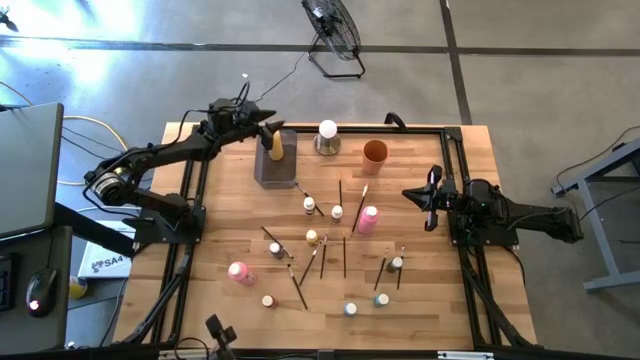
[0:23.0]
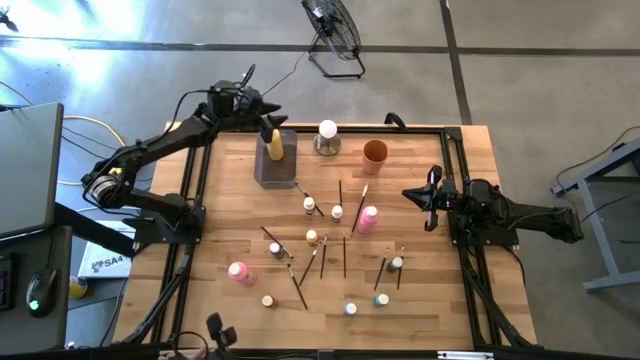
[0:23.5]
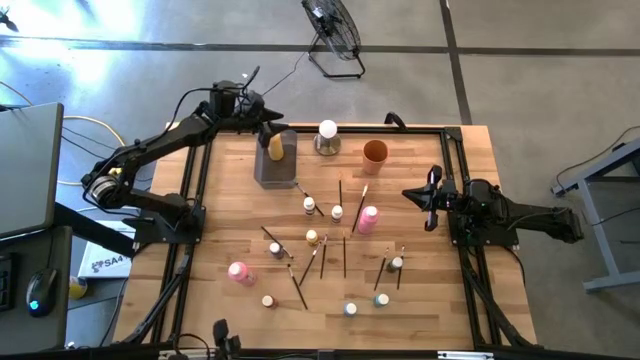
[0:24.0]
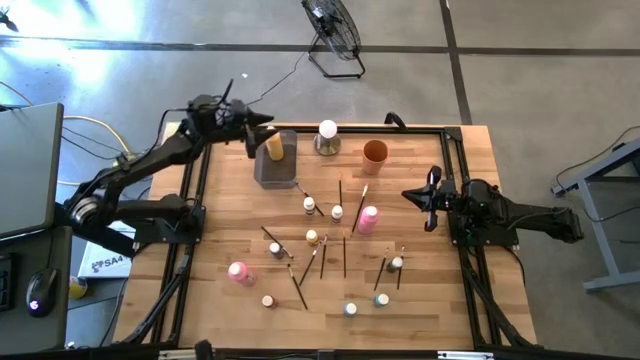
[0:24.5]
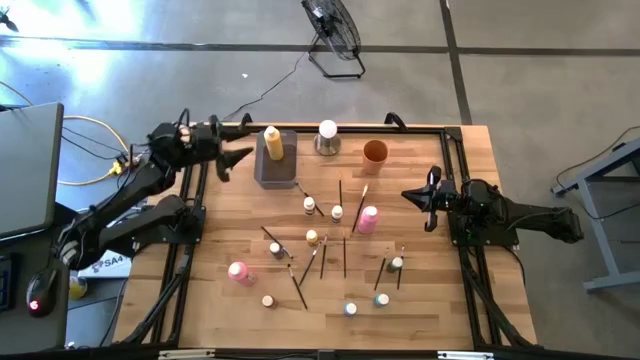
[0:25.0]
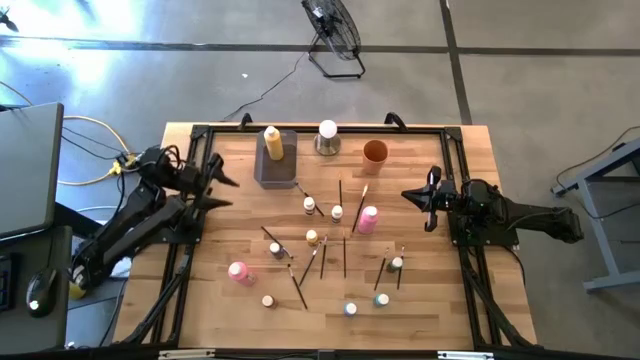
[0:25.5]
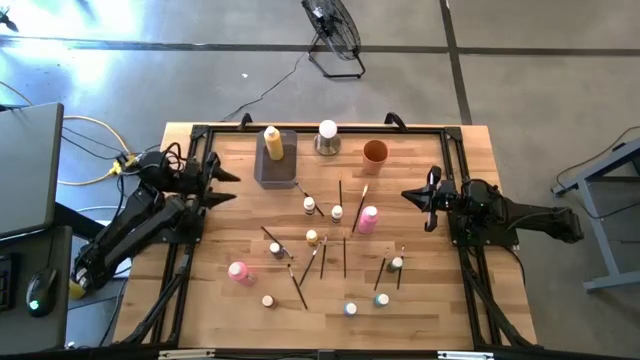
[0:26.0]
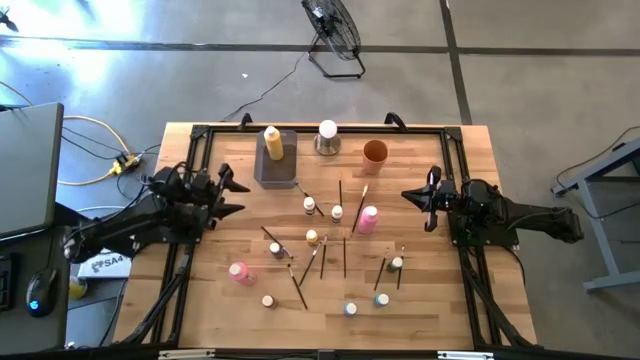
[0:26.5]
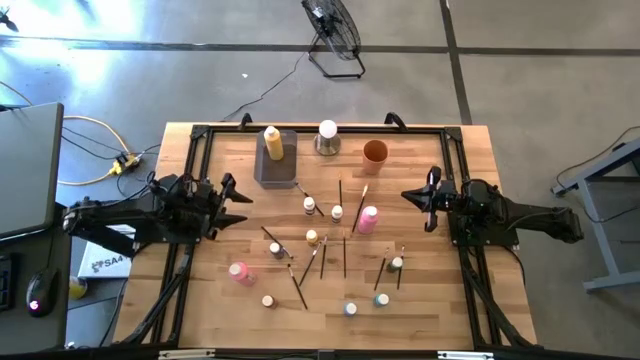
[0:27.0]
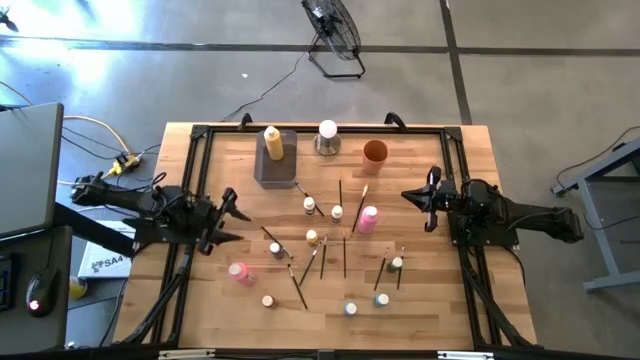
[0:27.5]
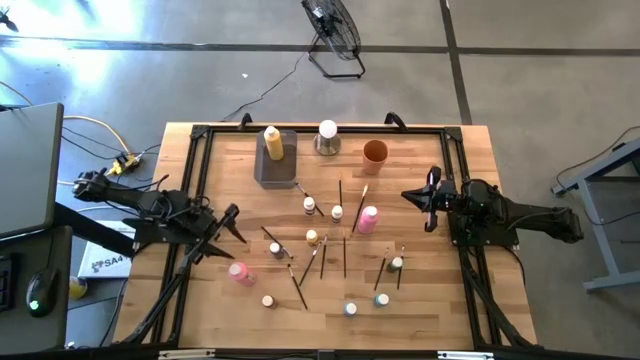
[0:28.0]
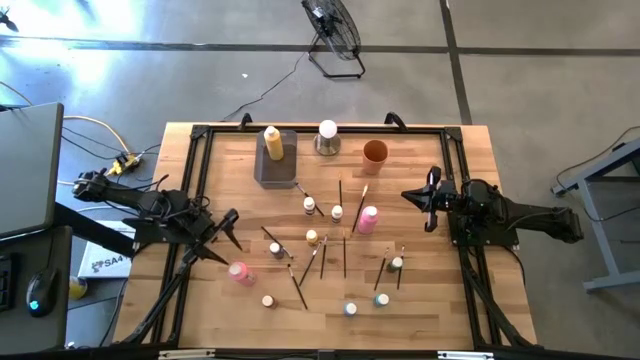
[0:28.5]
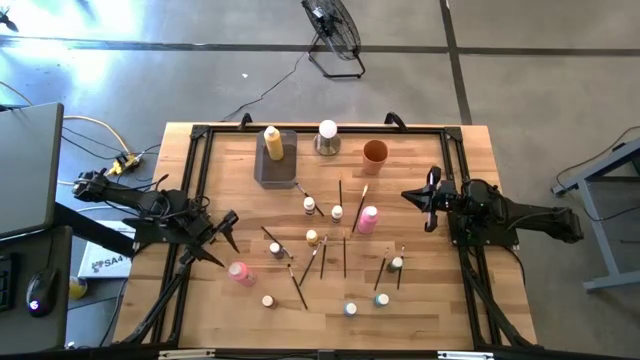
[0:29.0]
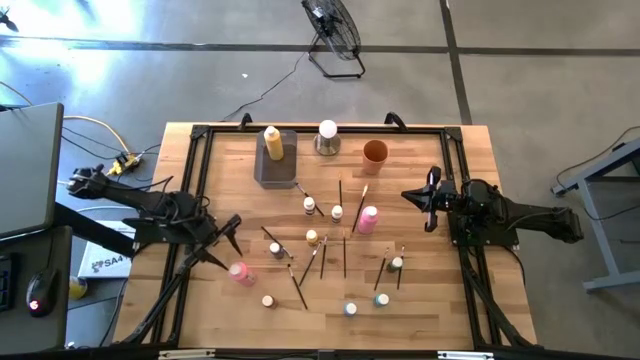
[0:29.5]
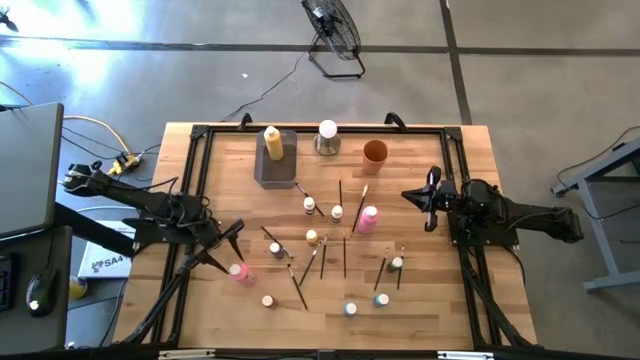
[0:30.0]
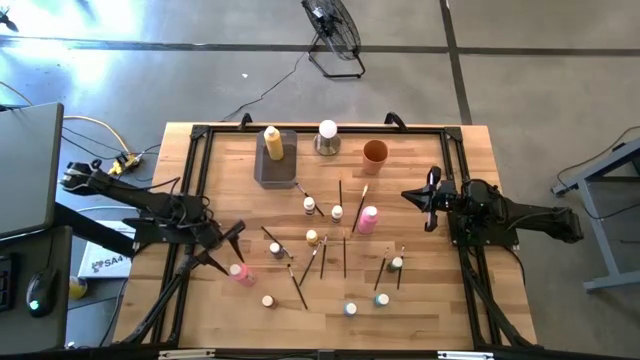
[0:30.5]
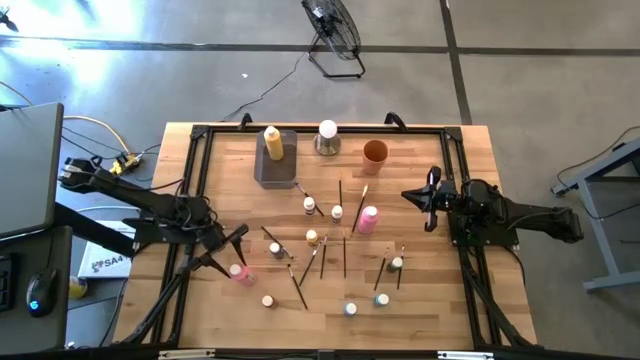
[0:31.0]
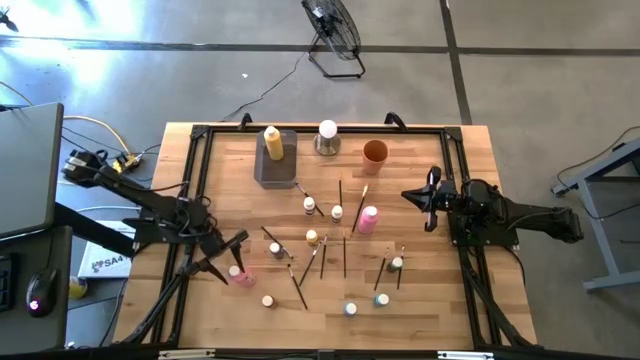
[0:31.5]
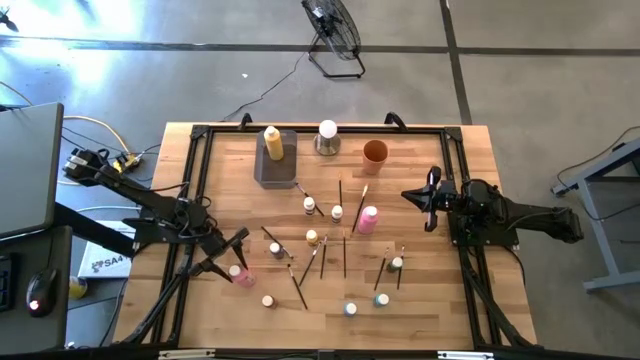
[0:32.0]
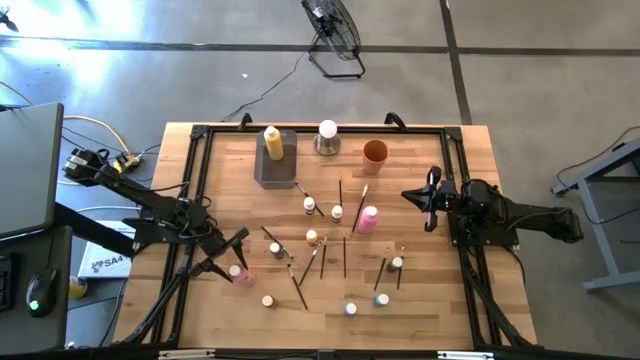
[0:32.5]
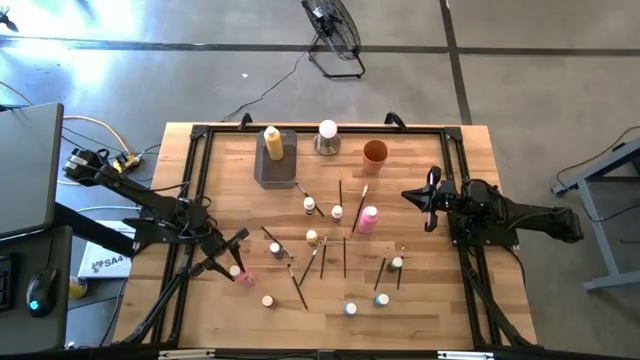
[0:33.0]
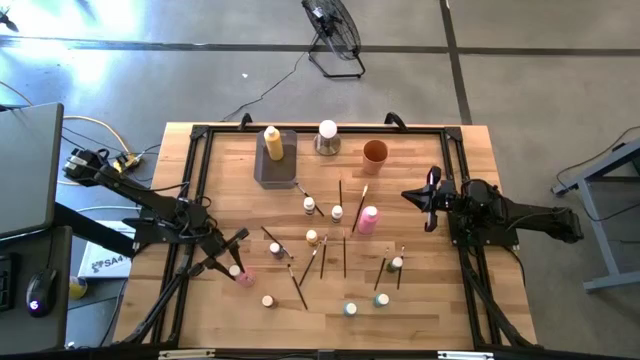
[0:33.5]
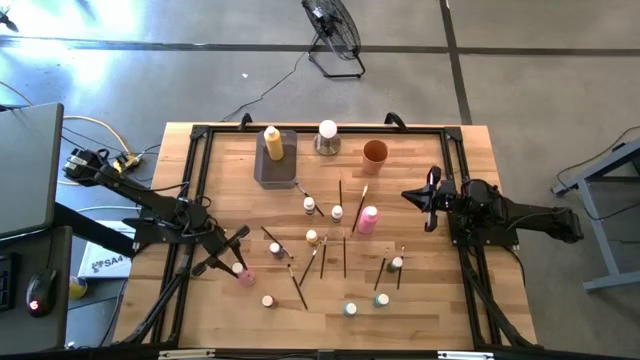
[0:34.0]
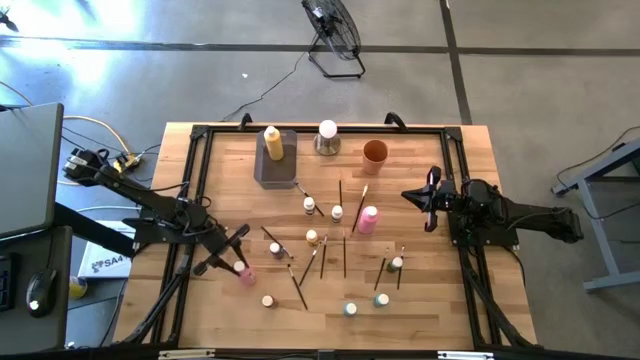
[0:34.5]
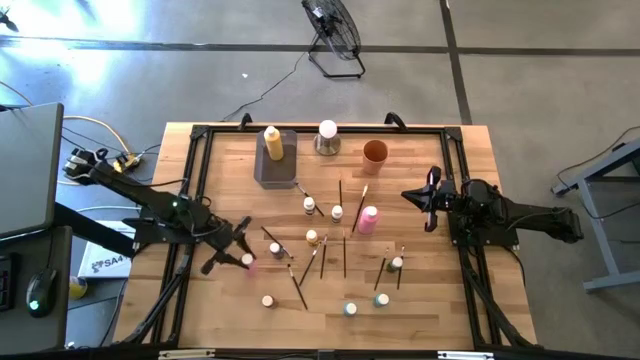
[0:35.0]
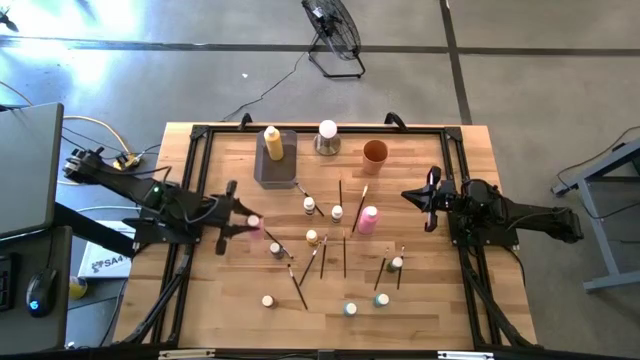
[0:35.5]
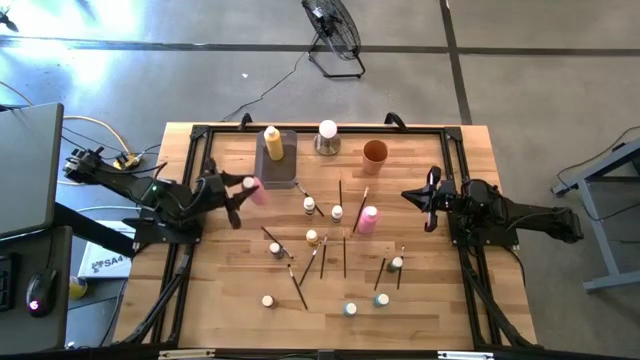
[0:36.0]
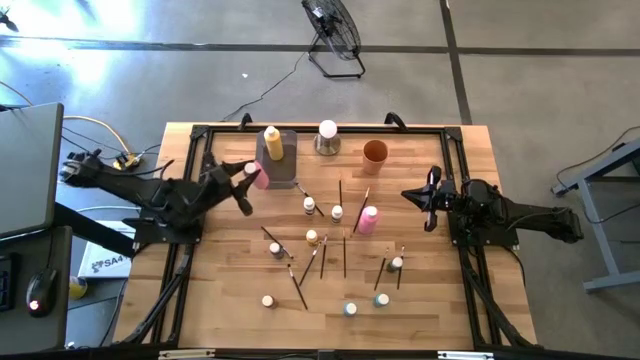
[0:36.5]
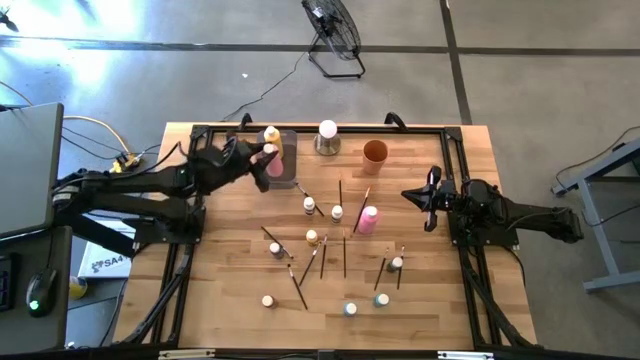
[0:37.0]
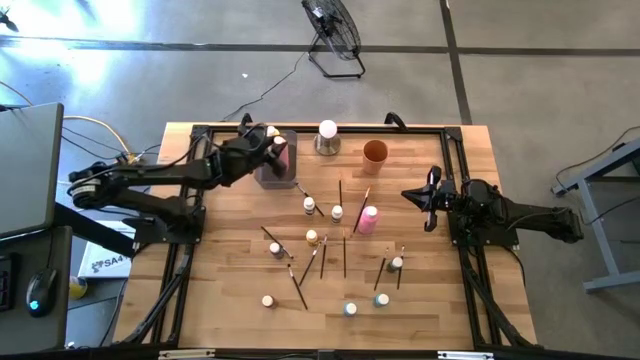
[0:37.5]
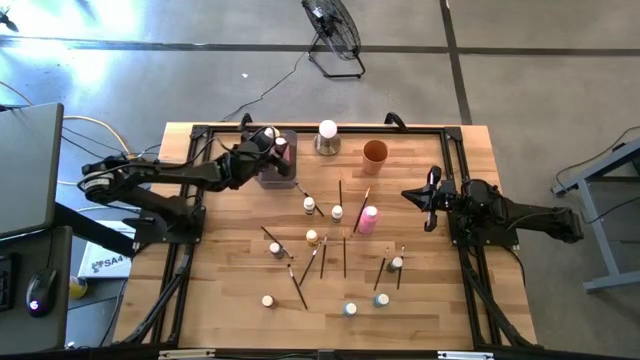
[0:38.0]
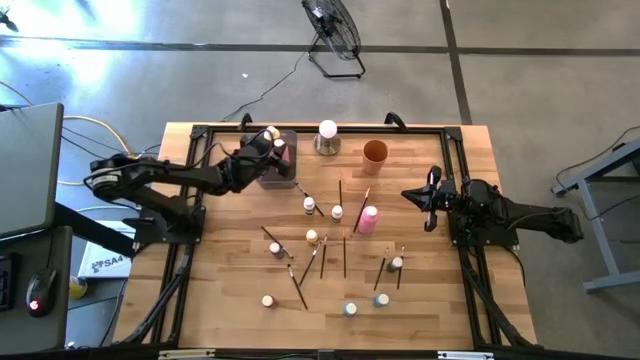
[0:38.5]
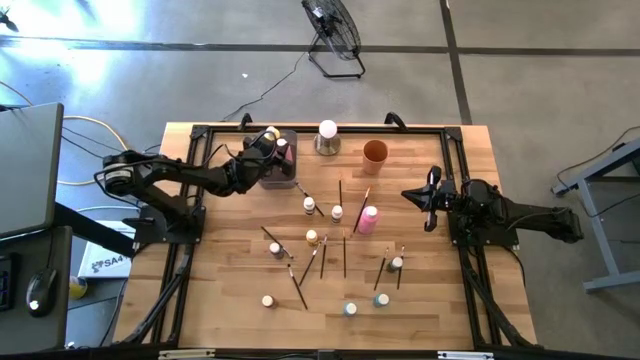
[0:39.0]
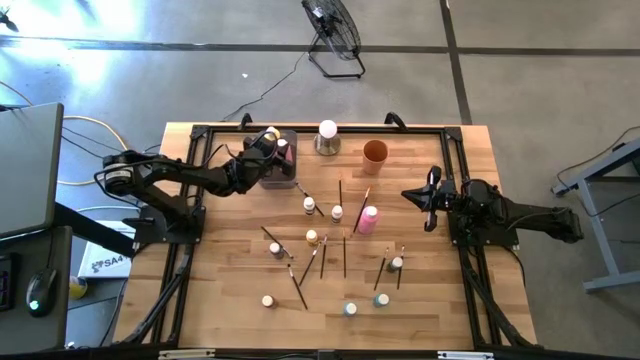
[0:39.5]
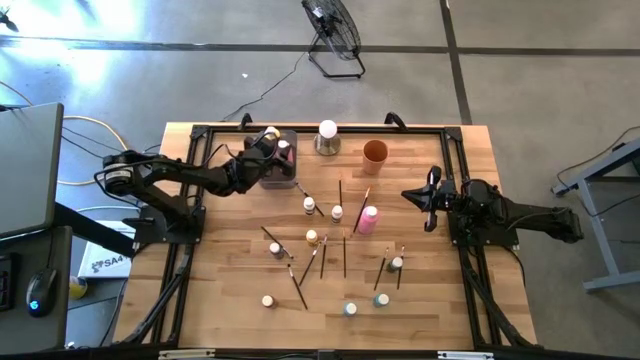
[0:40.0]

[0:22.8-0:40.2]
Task: Pick & Place Paint Supplies
Put the left large pink paint bottle into the gray bin

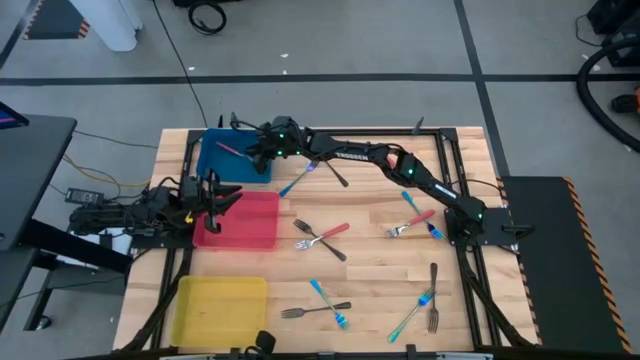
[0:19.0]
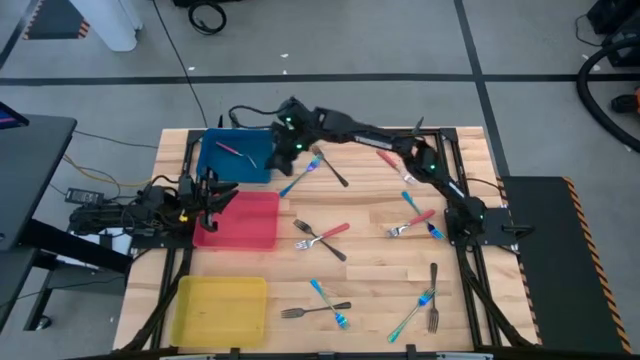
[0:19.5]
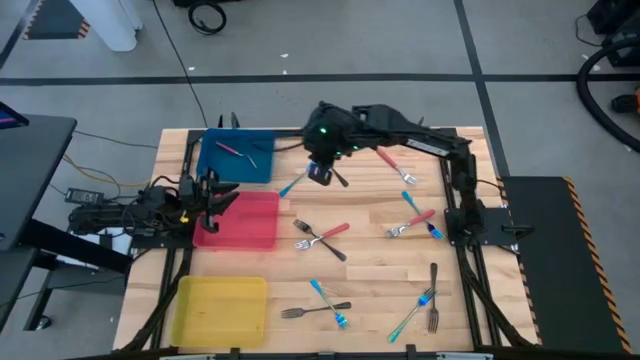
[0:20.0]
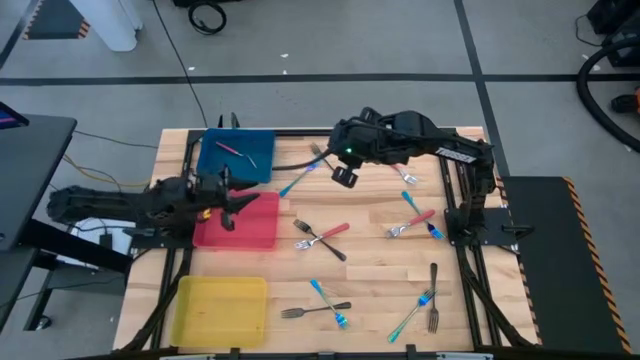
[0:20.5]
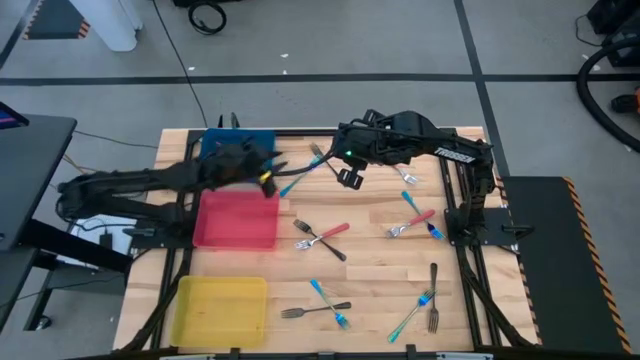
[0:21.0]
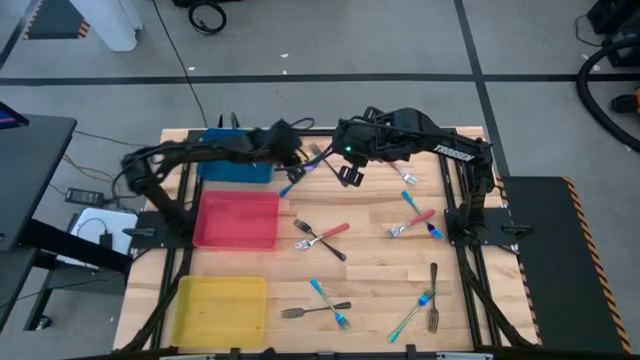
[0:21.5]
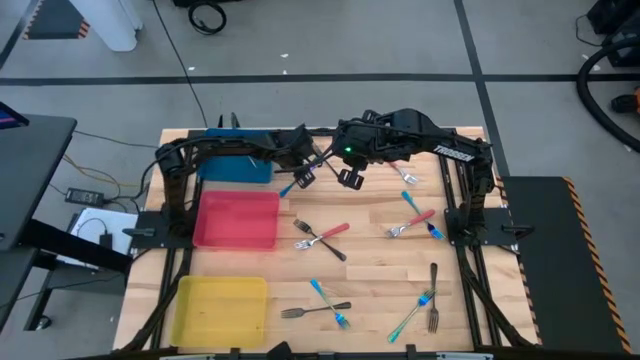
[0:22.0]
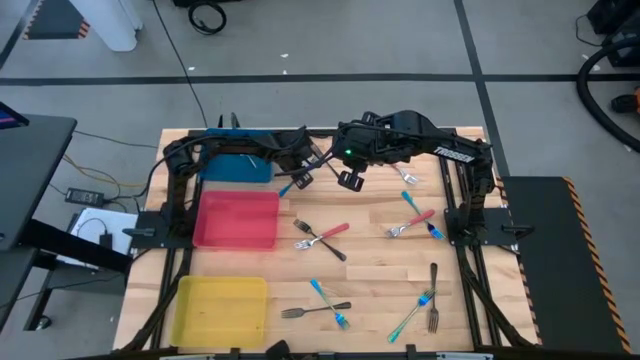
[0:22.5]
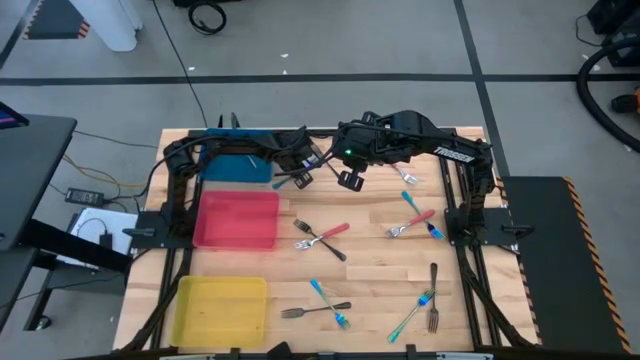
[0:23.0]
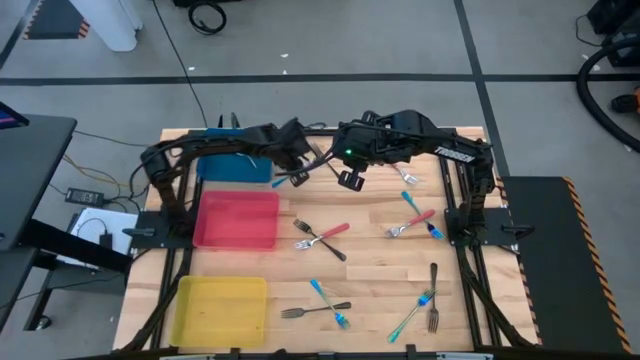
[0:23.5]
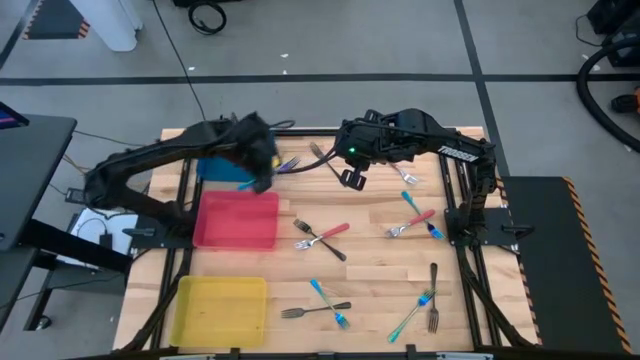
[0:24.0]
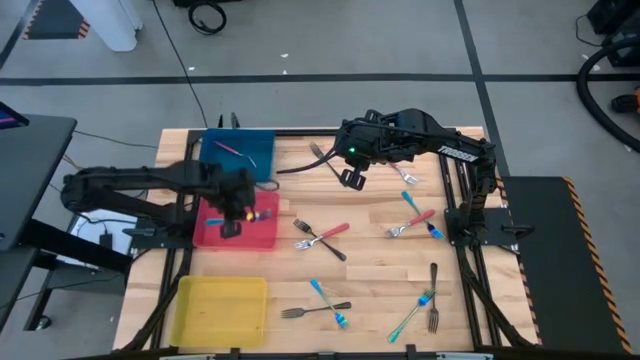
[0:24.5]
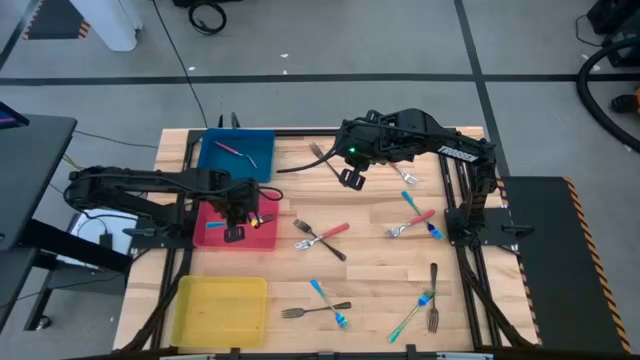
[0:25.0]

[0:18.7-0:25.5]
Task: Sort silverware by color (type)
Put the top left light blue fork into the red bin
